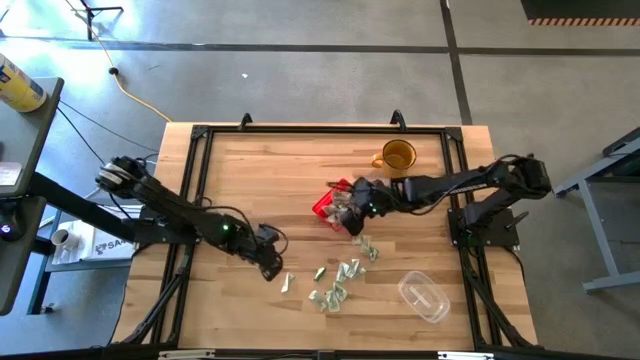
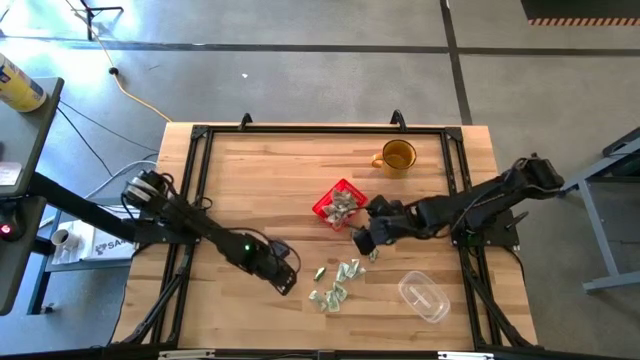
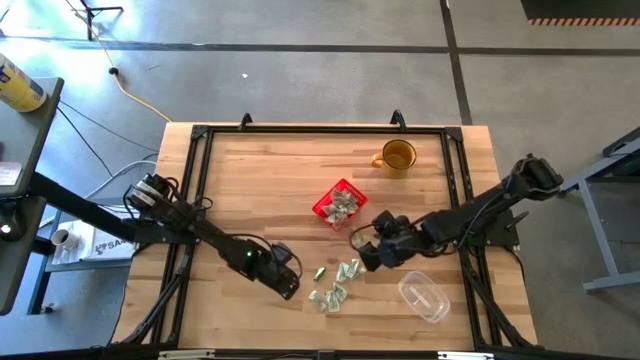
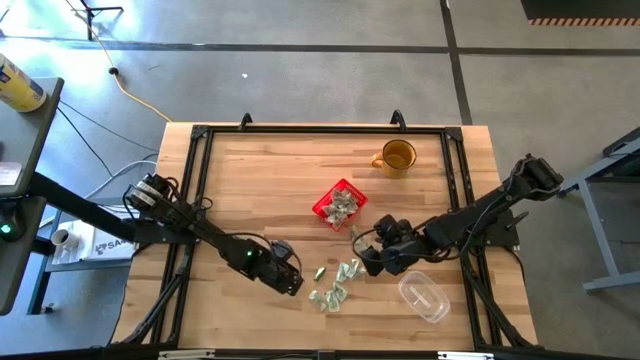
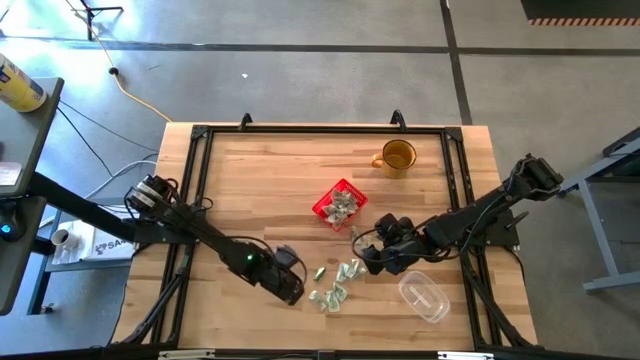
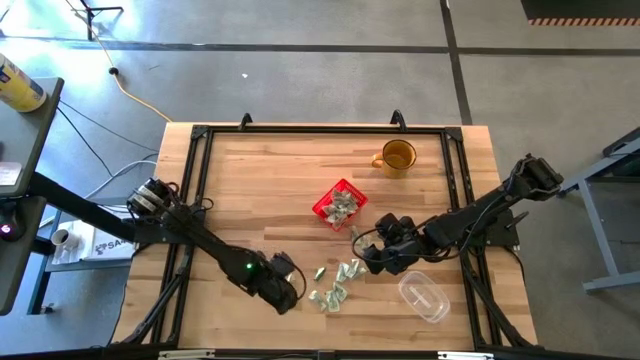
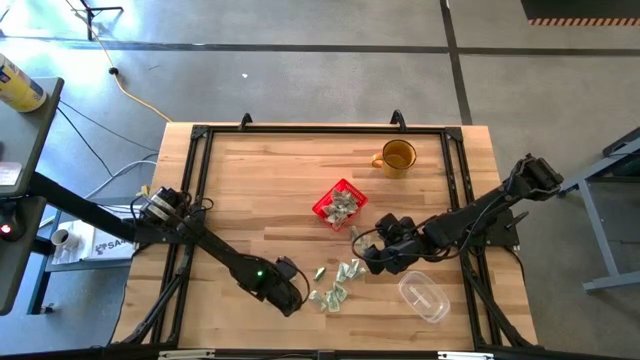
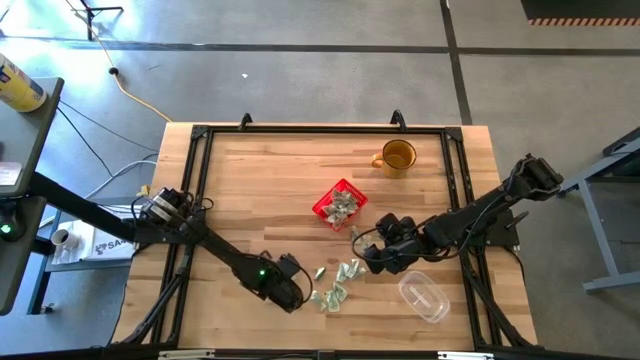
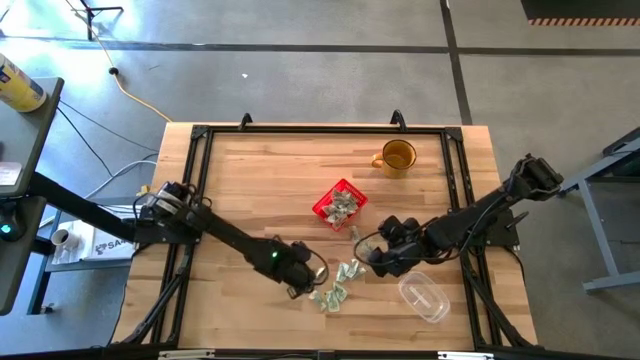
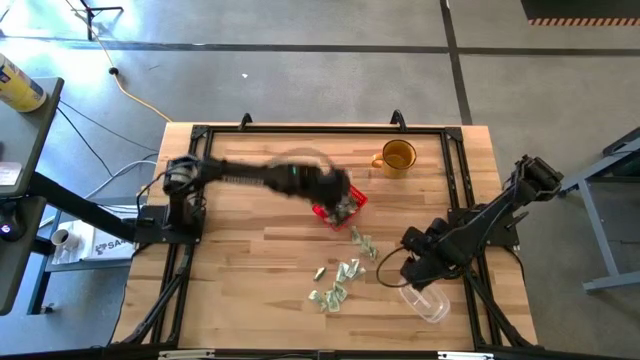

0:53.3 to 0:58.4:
Task: Pick and place items into bin
Put the white stevia packet into the red bin

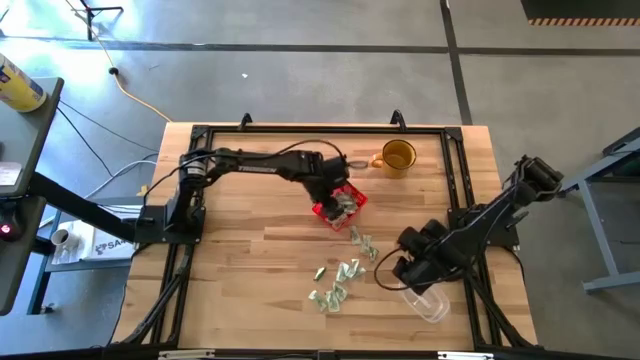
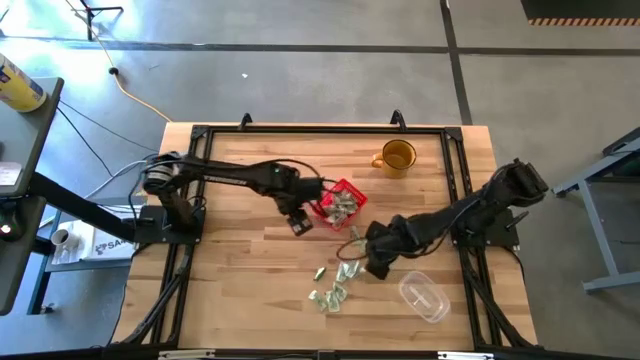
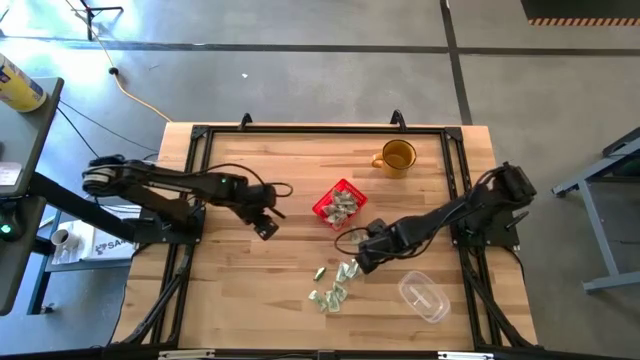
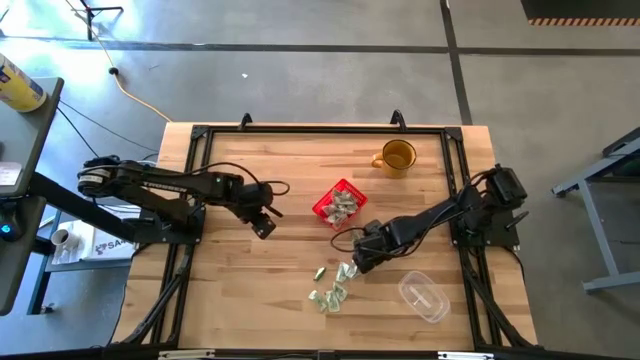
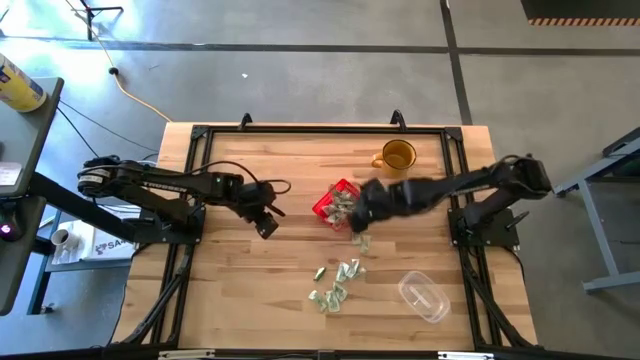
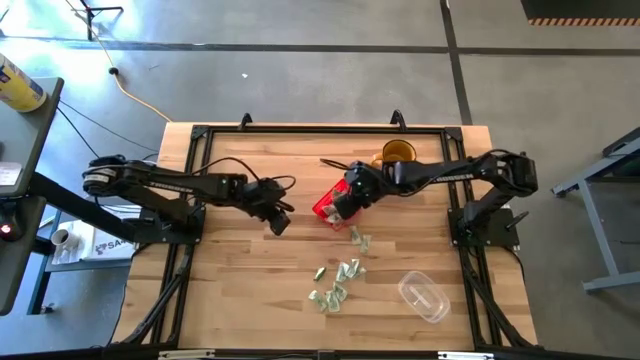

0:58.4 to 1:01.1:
Put the green stevia packet into the red bin

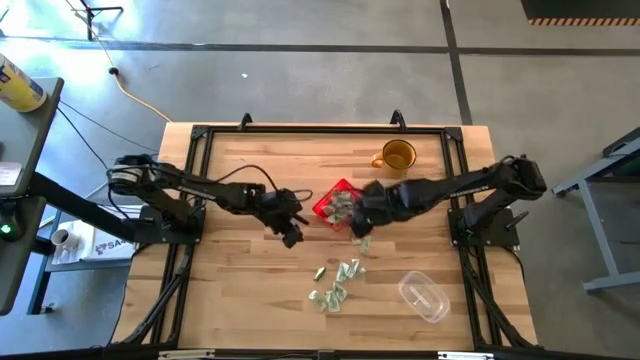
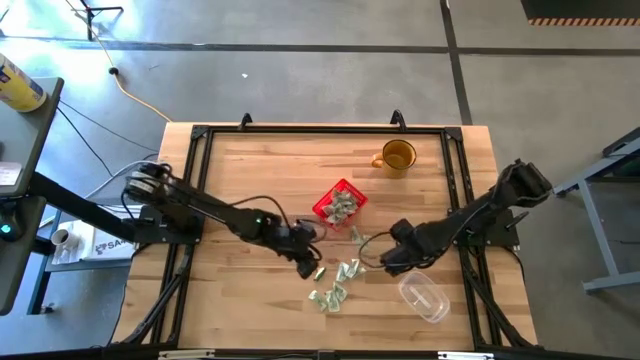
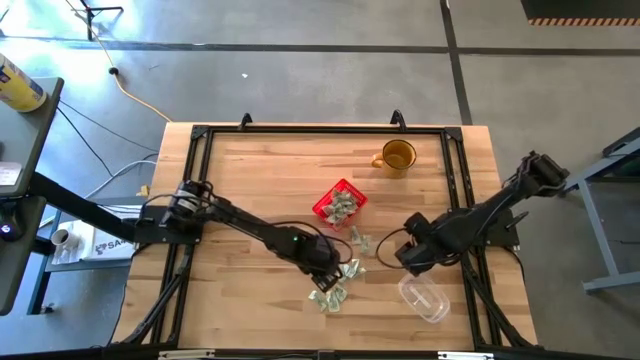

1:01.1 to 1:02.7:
Put the green stevia packet into the red bin

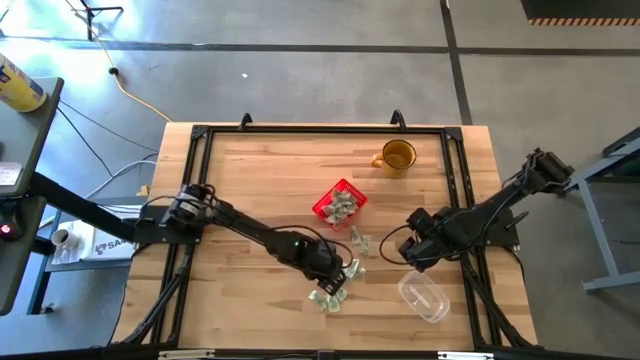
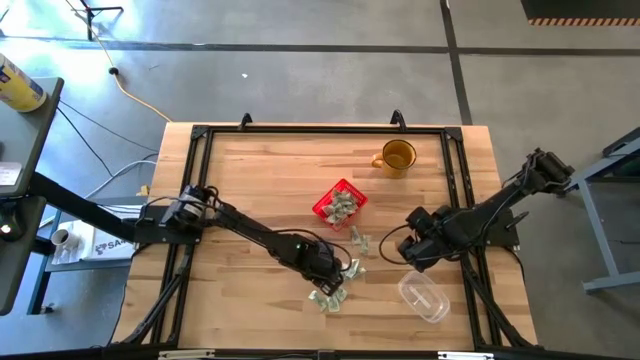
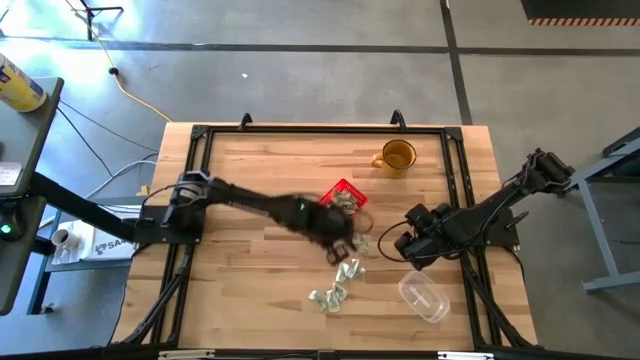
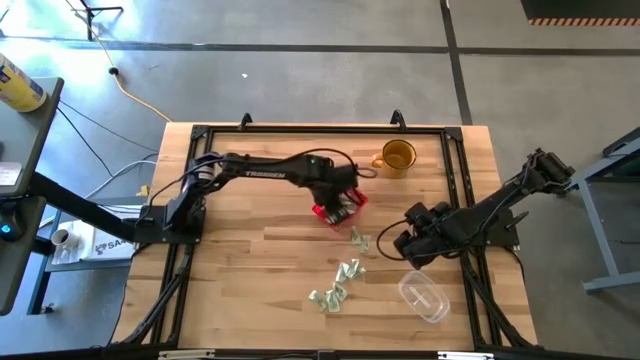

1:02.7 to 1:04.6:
Put the green stevia packet into the red bin

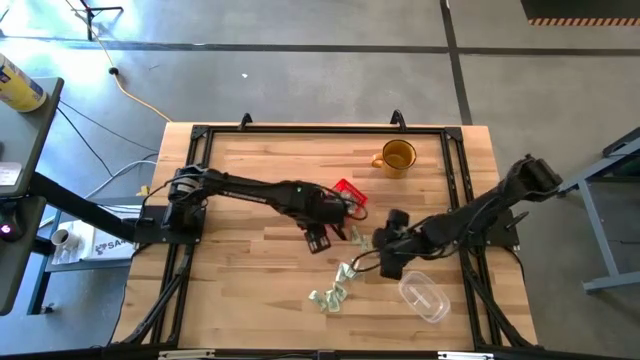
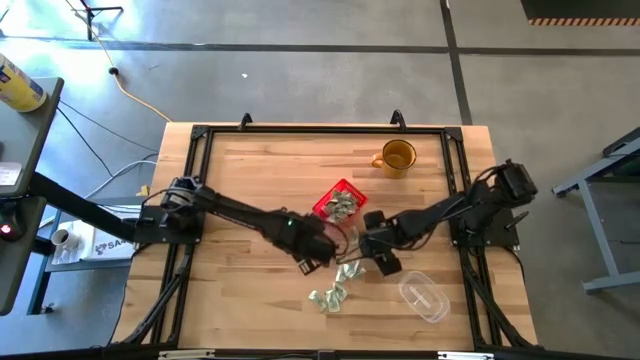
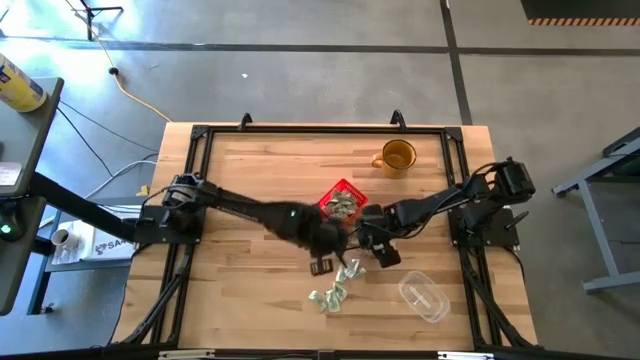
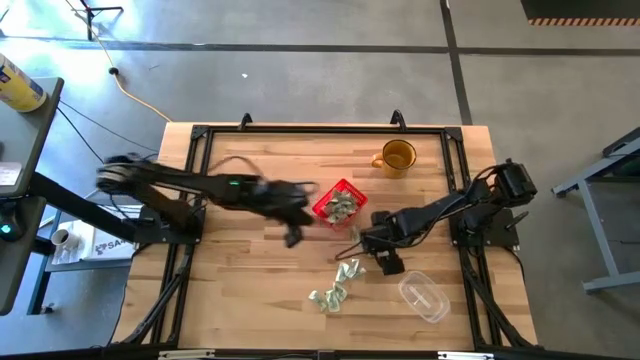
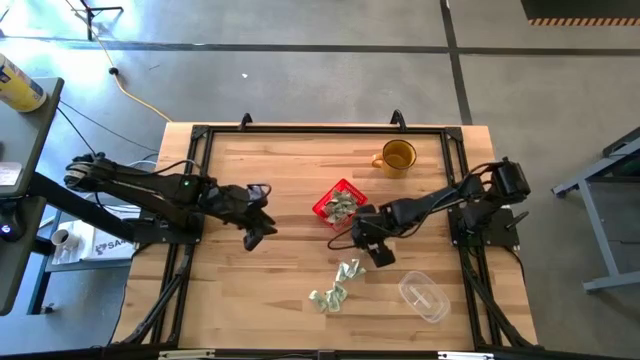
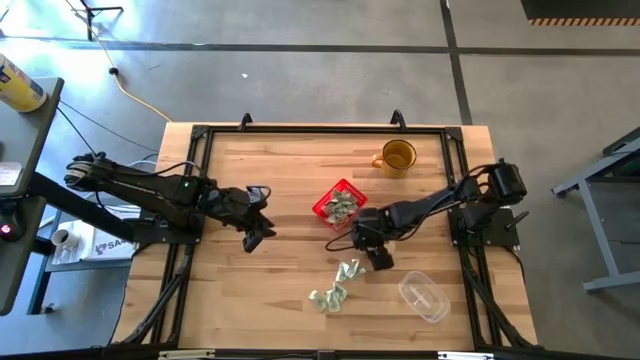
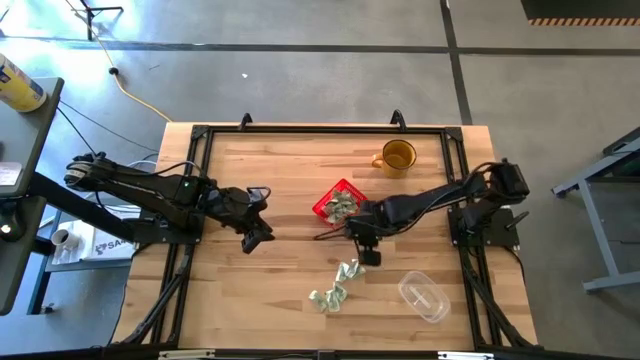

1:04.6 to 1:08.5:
Put the white stevia packet into the red bin

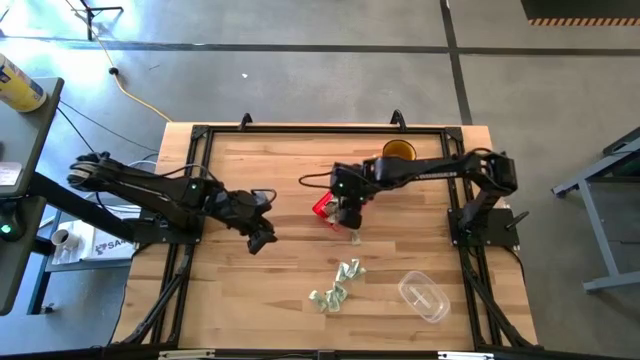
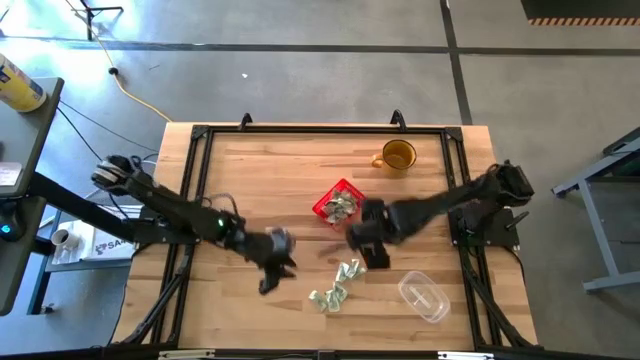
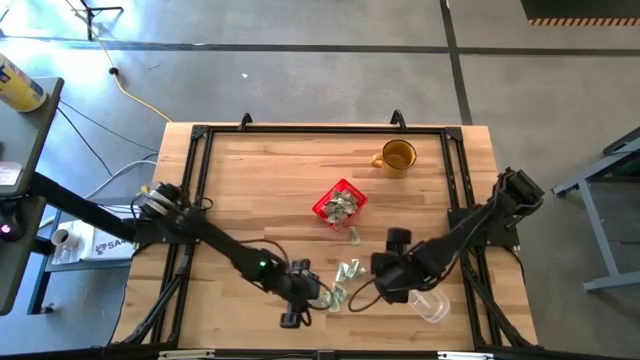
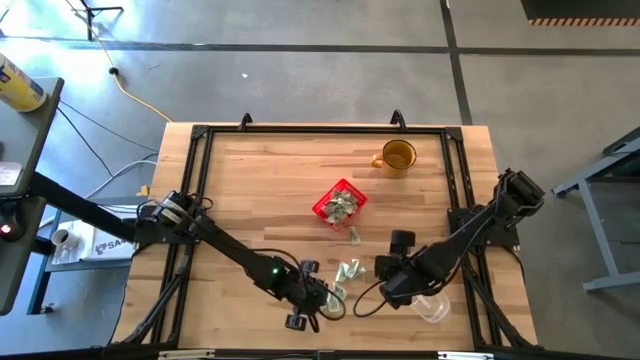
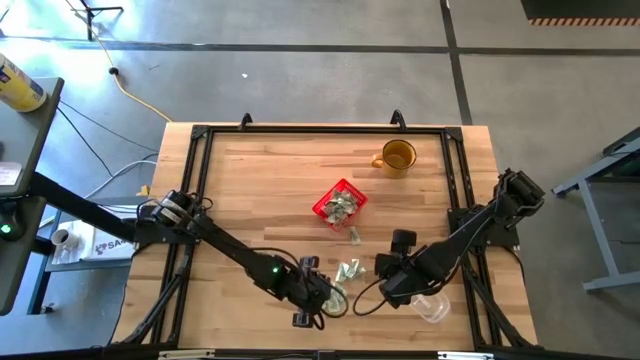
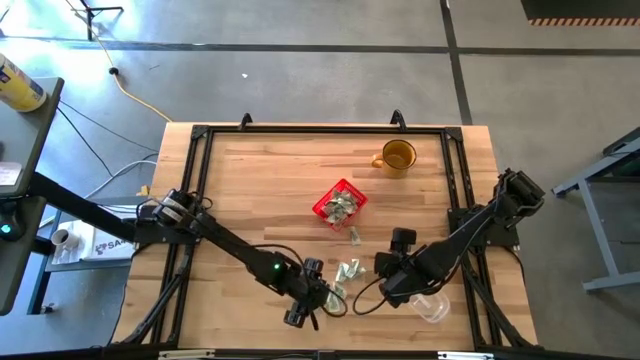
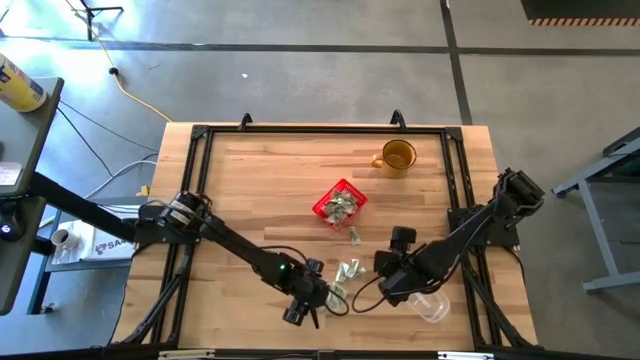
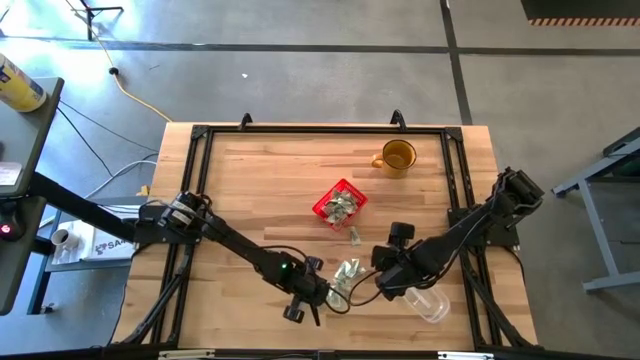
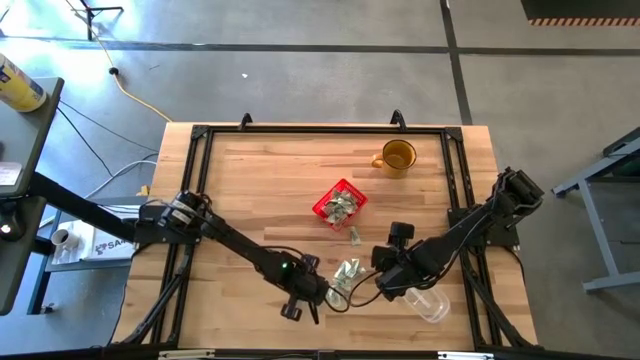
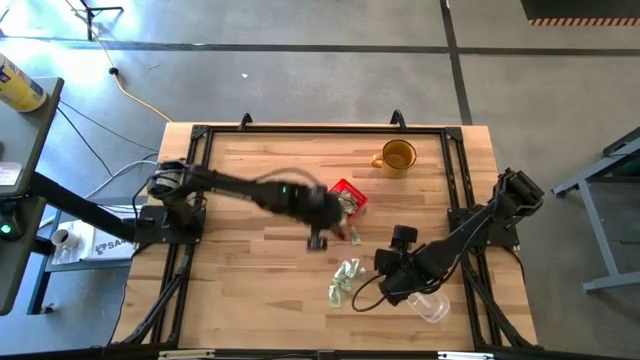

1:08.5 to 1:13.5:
Put the white stevia packet into the red bin

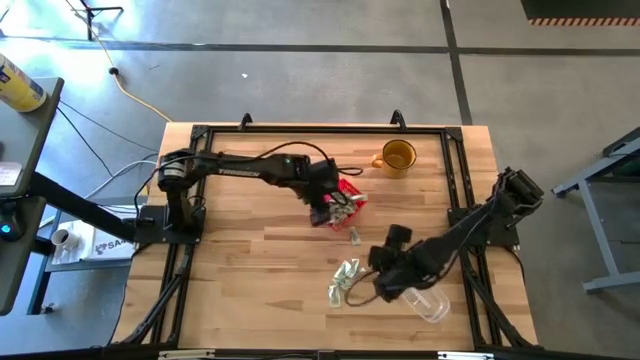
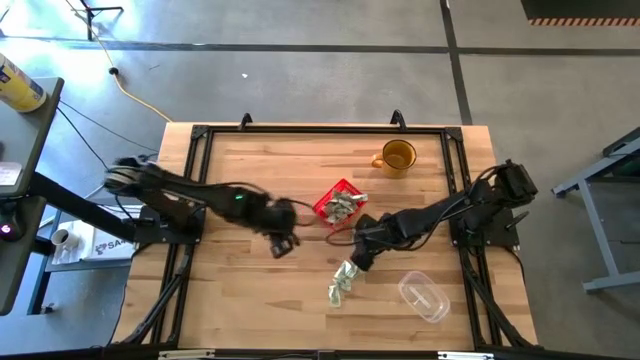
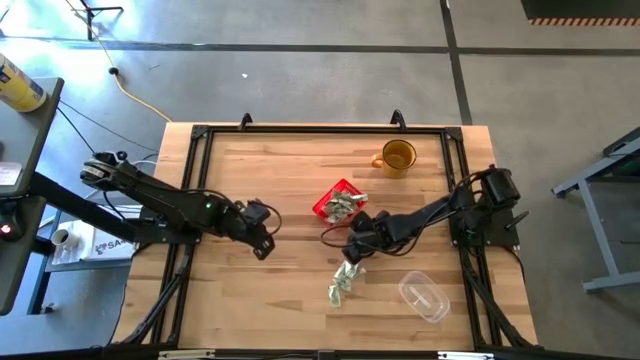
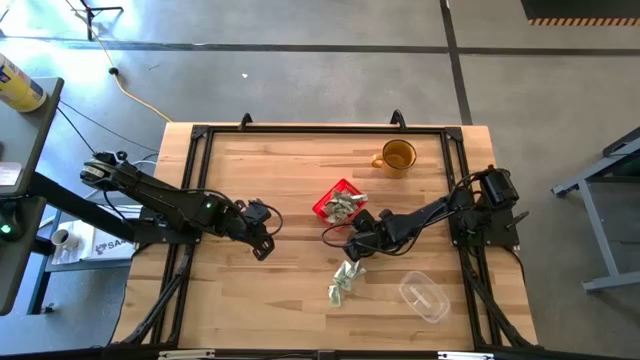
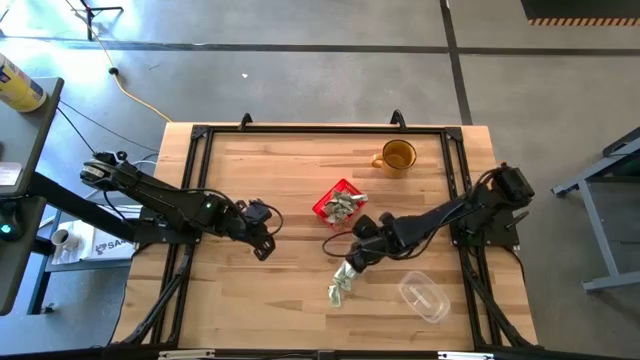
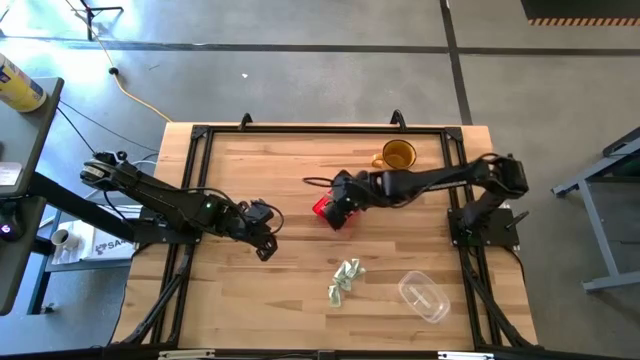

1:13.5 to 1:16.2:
Put the white stevia packet into the red bin
